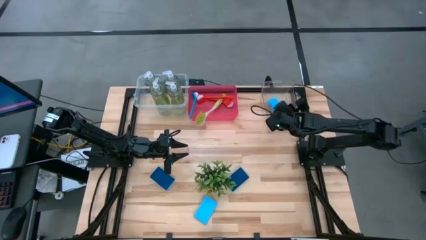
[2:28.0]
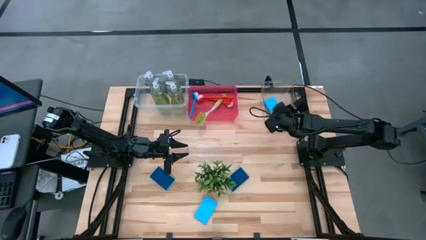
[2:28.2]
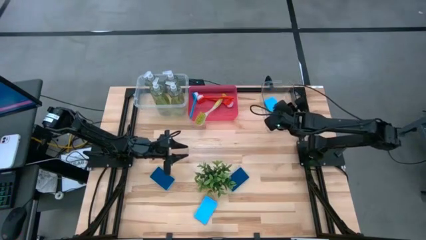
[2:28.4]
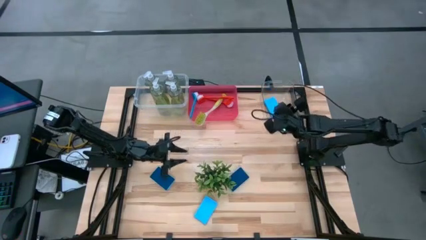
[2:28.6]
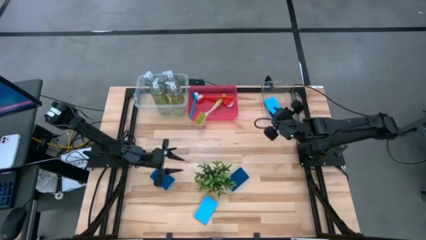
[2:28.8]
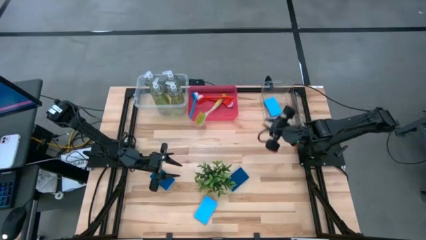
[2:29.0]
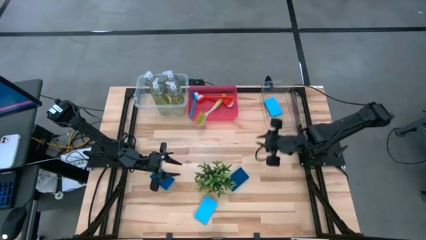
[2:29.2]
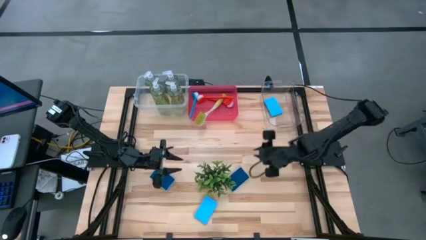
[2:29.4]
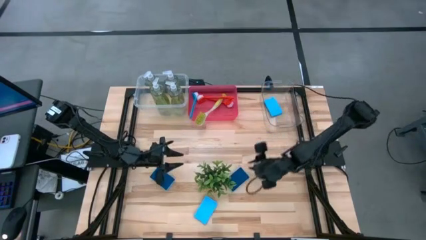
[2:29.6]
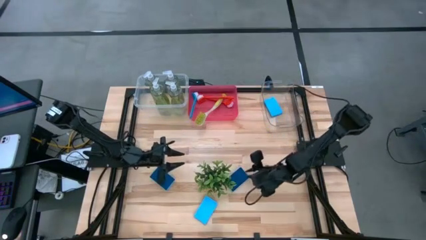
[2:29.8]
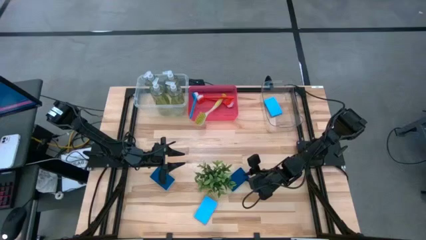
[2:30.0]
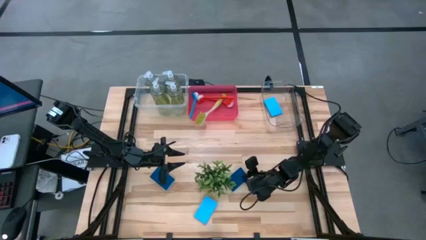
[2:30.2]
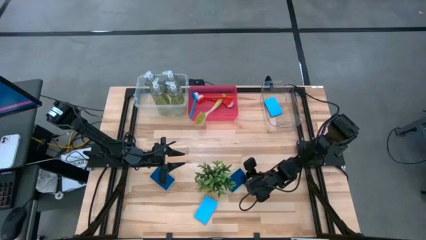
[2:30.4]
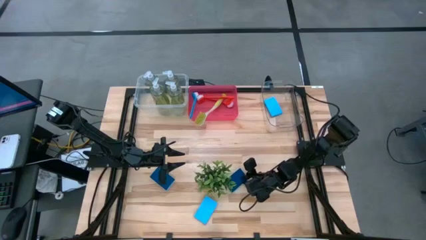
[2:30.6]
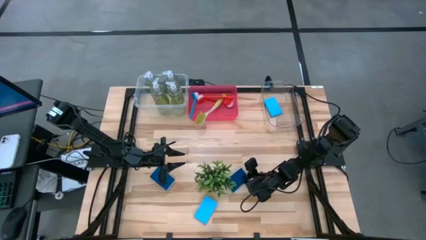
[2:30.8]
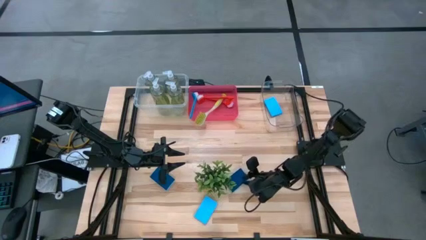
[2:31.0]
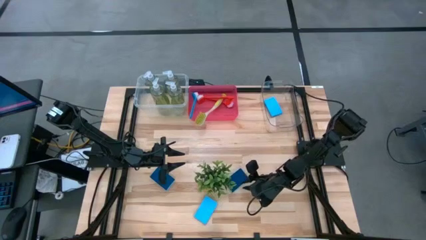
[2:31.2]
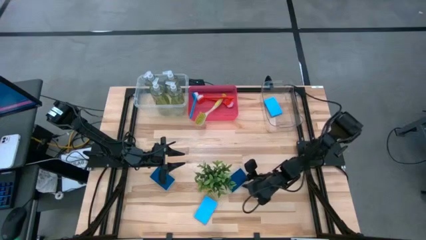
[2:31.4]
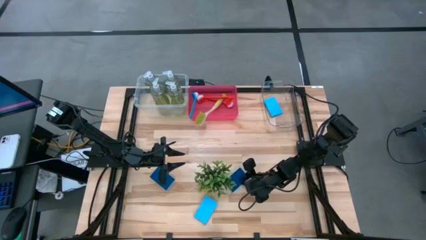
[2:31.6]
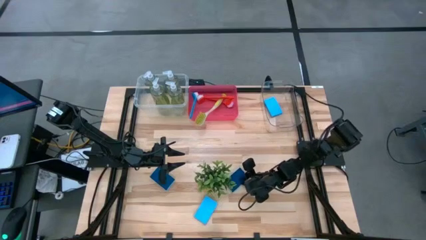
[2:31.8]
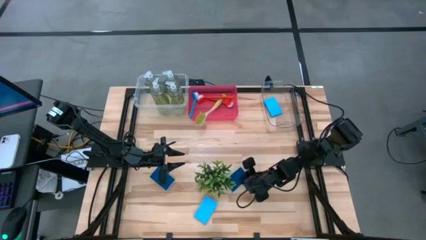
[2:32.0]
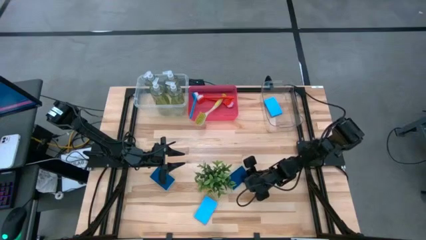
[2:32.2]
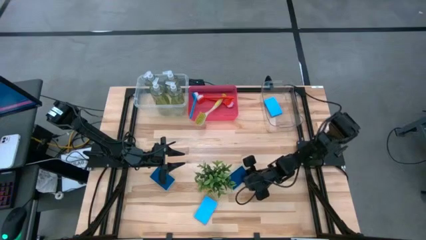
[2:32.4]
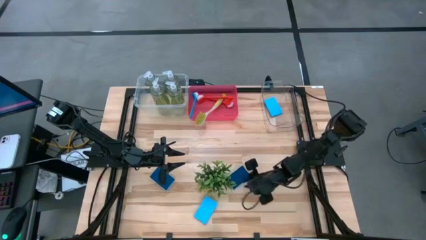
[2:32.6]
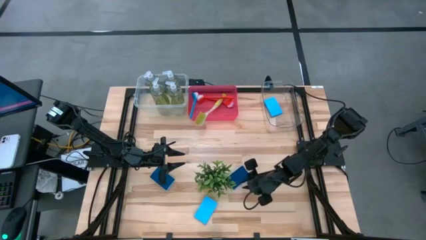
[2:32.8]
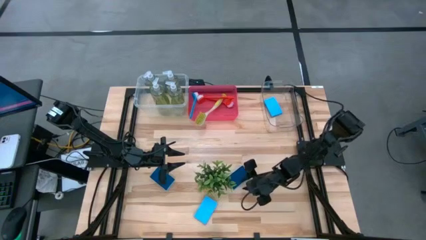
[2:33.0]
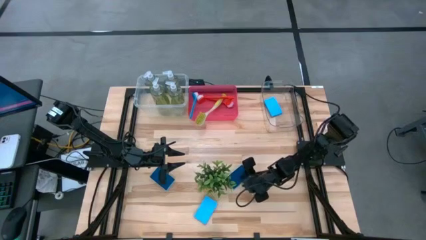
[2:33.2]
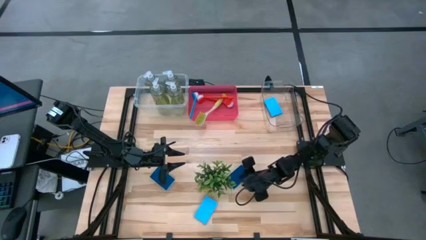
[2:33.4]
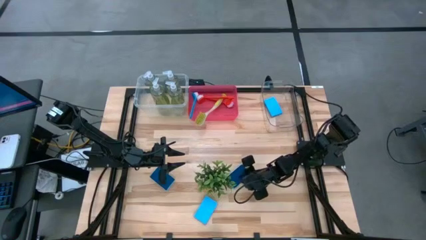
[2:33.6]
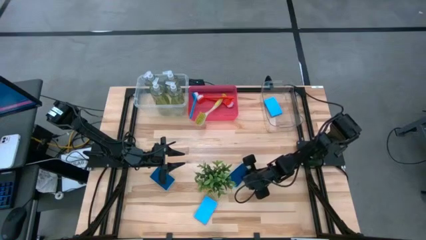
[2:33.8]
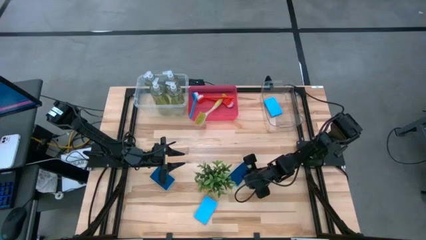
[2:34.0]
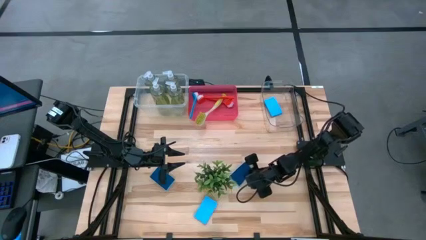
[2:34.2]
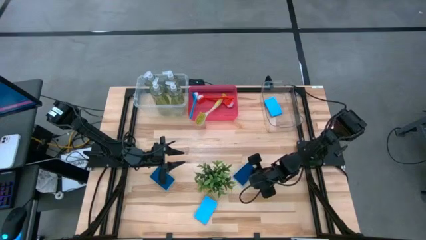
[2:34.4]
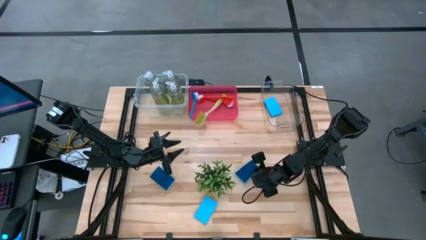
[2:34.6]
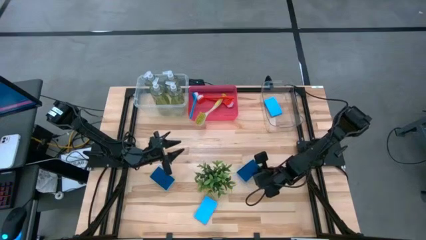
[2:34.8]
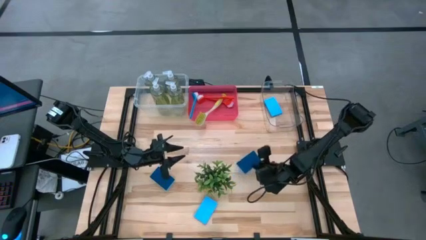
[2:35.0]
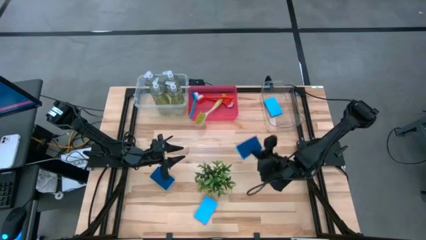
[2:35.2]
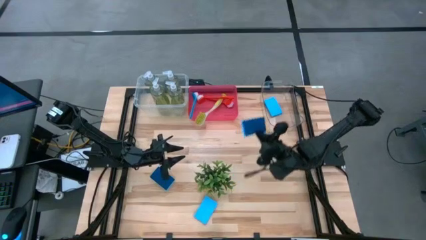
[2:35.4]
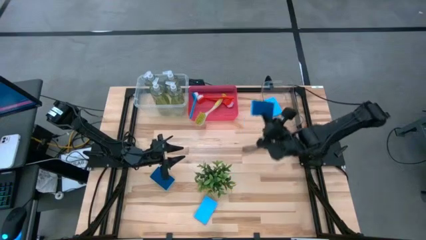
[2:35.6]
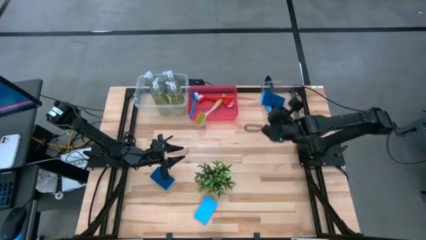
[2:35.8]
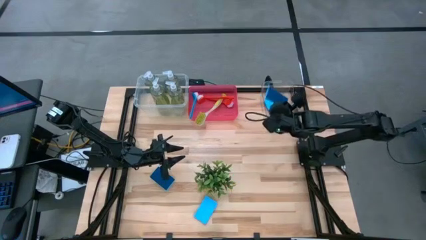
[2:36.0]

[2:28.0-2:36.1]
Task: Pick & Place Kitchen Sink Supplies
Put the blue sponge into the transparent bin

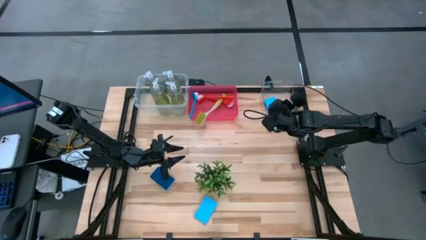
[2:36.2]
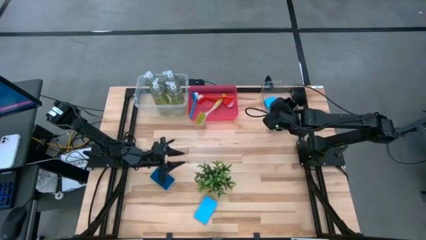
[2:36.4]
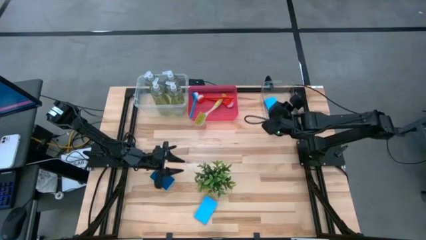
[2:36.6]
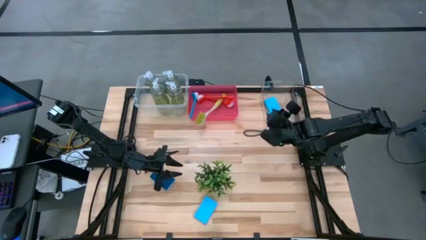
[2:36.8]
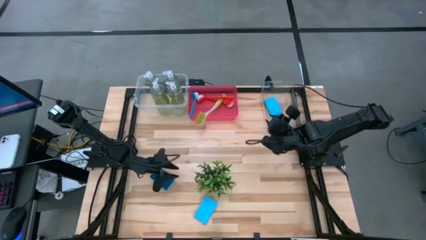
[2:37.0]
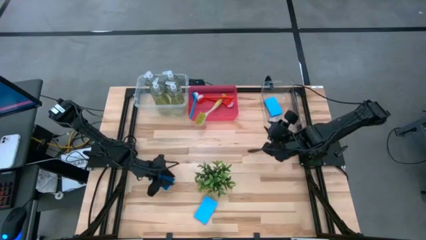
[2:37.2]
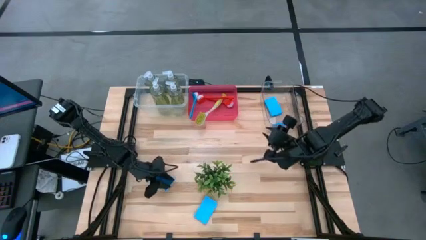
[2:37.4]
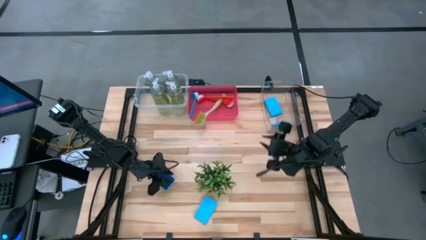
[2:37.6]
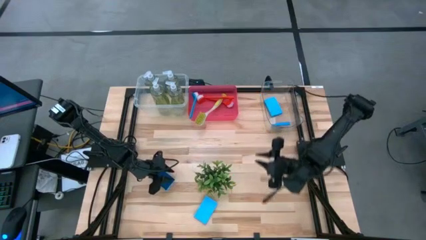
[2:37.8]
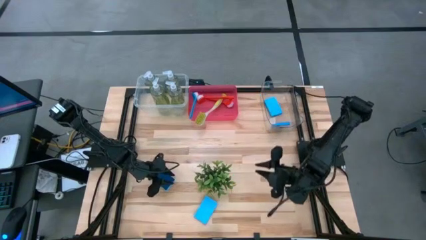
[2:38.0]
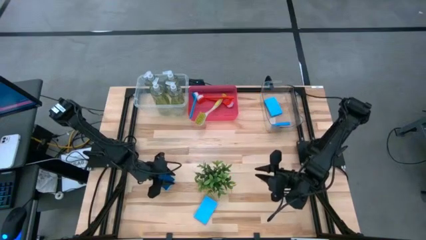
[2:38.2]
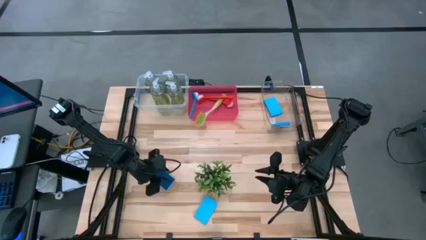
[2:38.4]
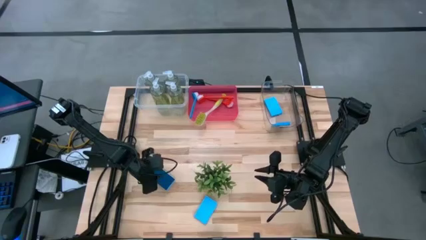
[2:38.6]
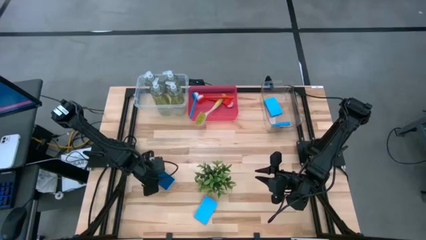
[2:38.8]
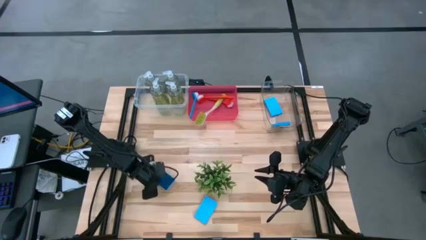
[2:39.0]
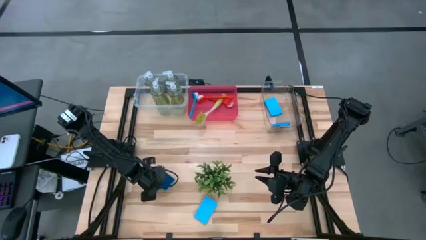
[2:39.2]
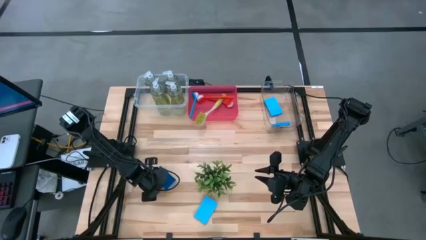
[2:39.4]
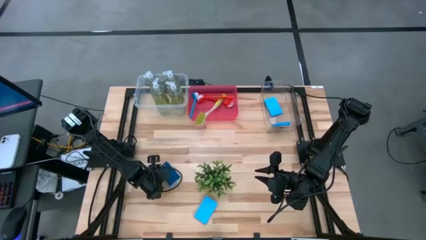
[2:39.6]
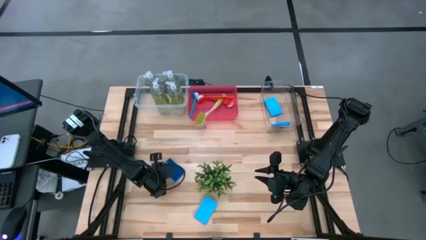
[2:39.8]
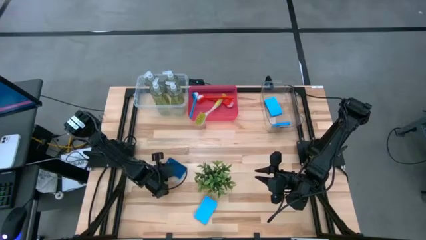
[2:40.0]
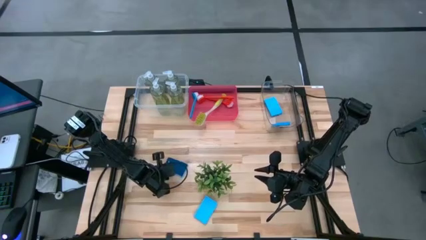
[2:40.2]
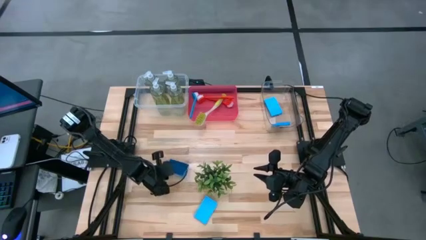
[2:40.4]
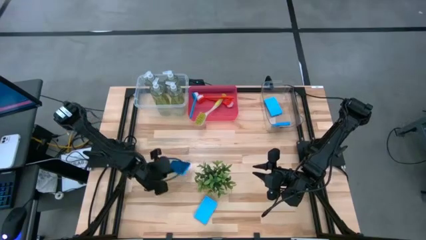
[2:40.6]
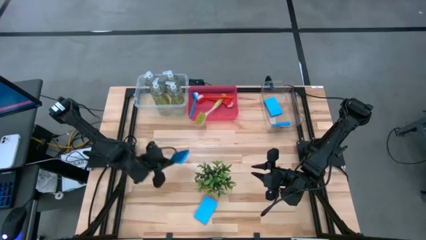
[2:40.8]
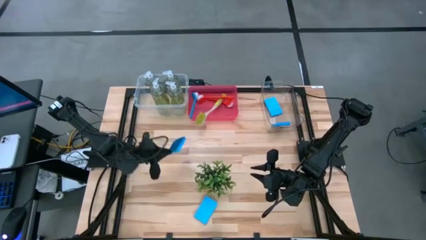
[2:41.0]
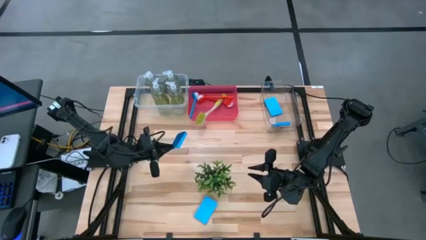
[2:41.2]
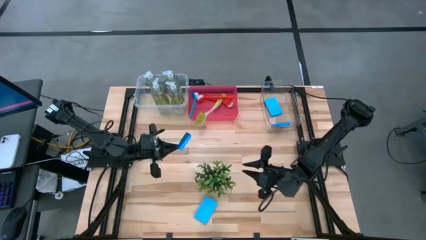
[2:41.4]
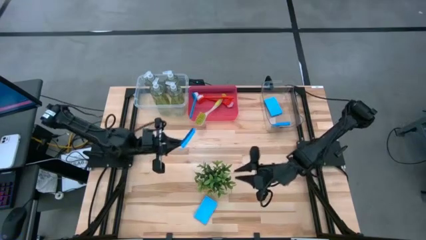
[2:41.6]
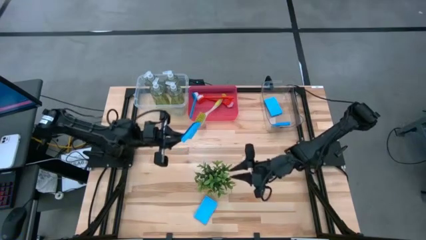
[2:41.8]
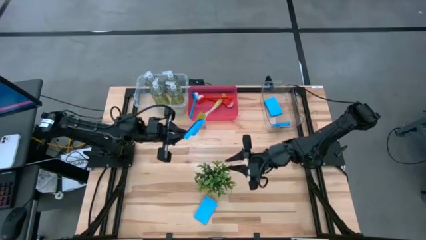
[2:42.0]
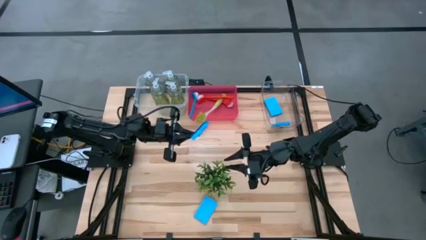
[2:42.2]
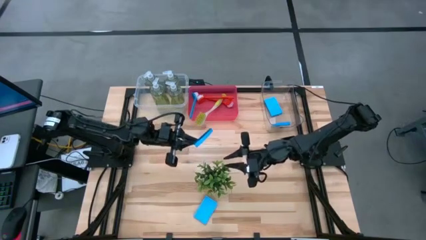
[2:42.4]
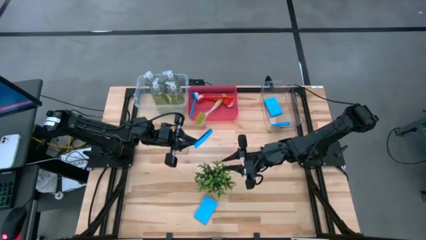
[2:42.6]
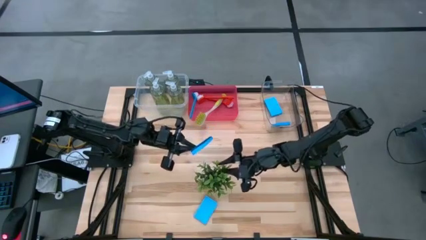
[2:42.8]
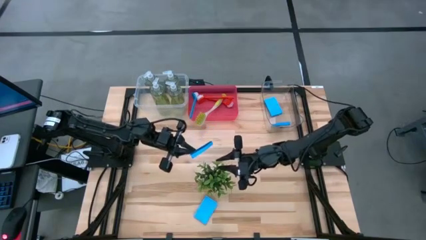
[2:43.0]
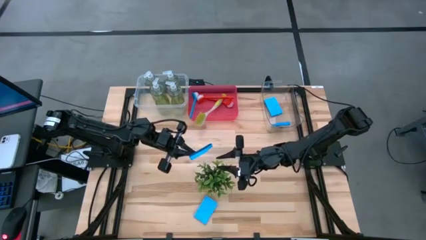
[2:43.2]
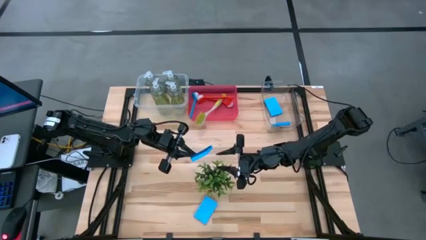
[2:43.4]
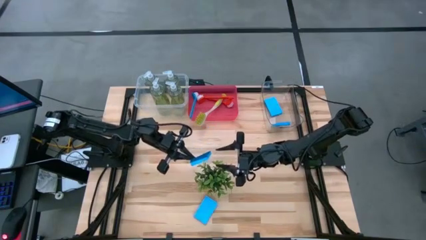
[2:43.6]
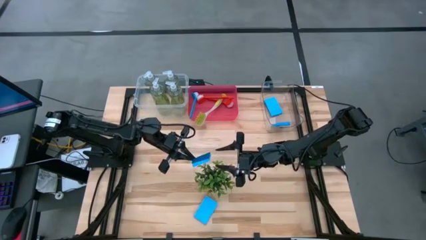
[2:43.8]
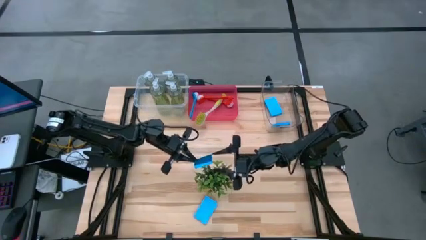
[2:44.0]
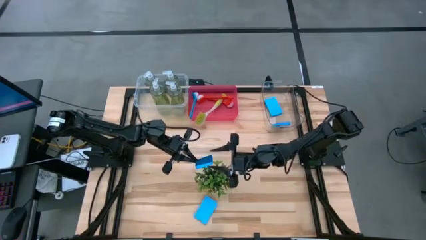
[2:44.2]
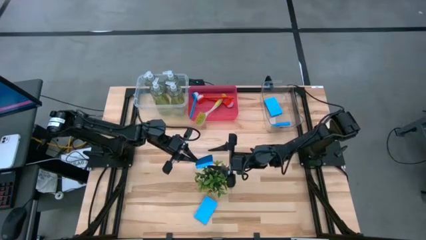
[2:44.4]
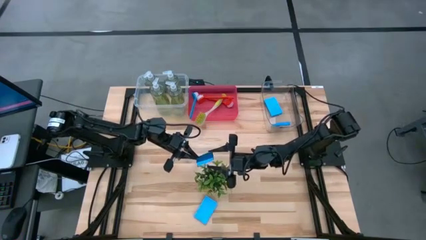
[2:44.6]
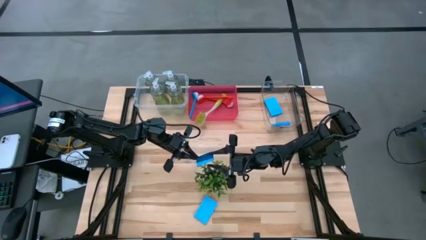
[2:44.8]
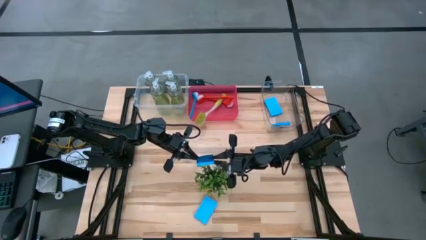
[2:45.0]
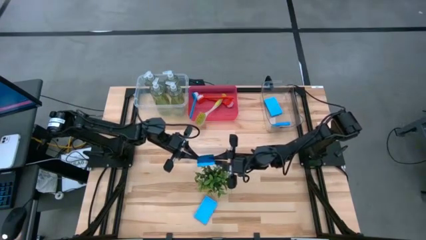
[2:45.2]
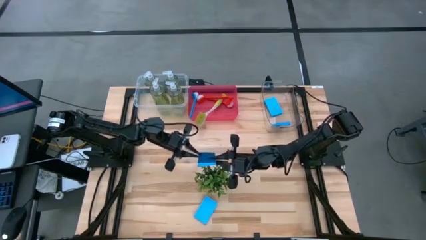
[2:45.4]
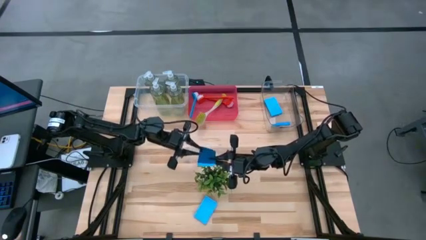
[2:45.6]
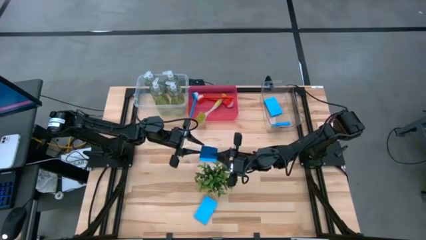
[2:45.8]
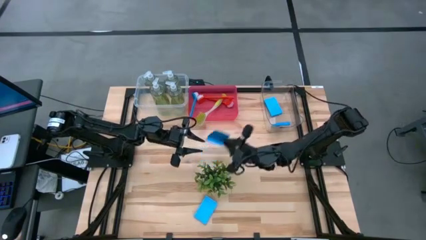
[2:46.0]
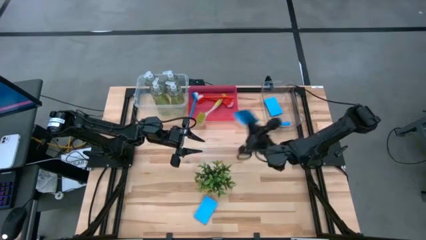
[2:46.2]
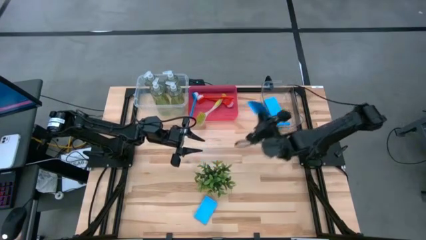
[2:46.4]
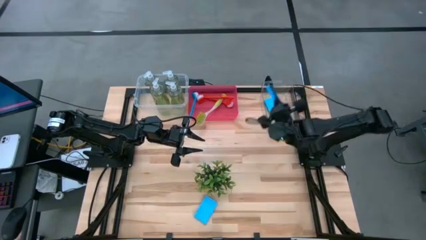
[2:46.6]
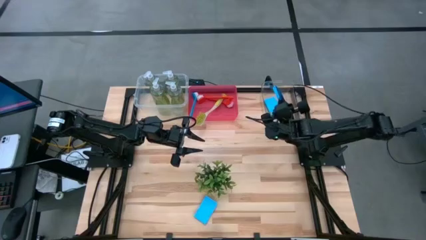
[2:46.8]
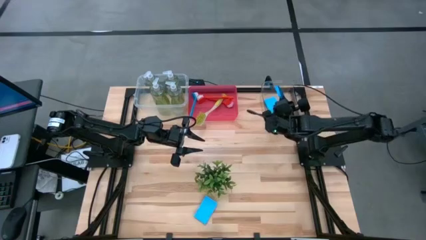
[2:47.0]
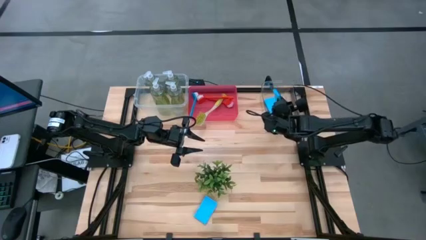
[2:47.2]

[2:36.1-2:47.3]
Put the blue sponge into the transparent bin
